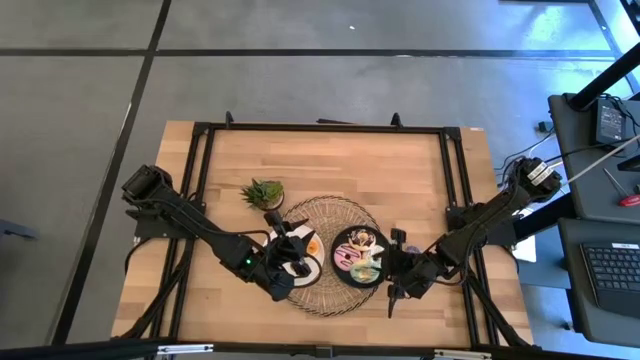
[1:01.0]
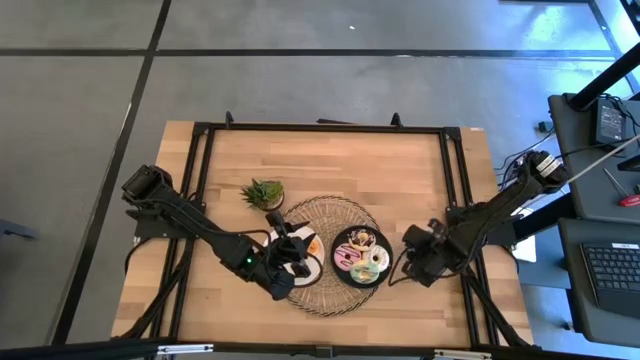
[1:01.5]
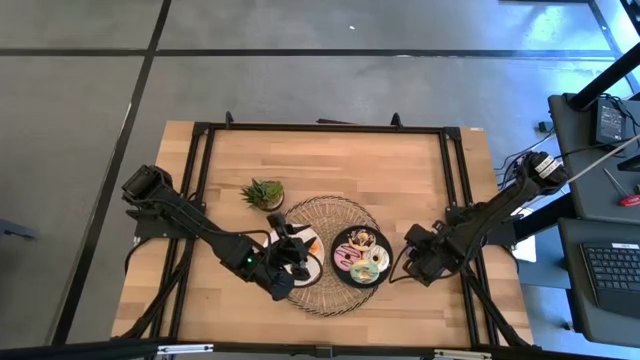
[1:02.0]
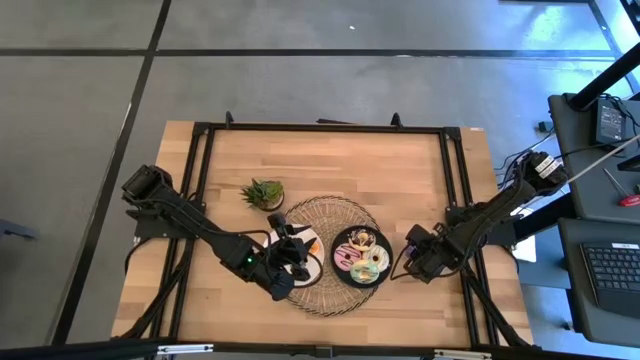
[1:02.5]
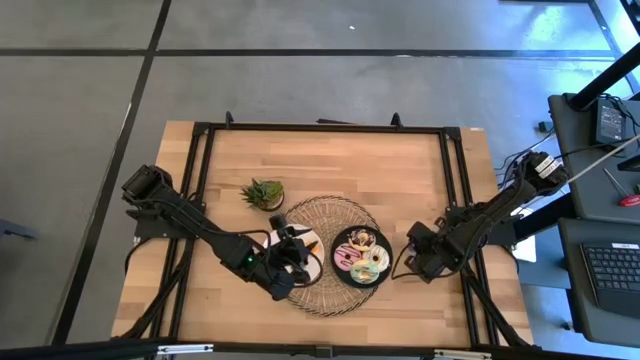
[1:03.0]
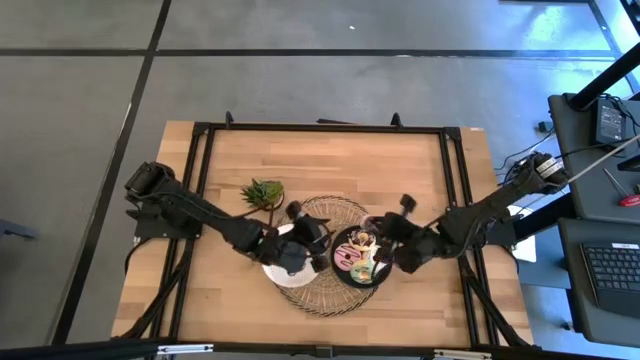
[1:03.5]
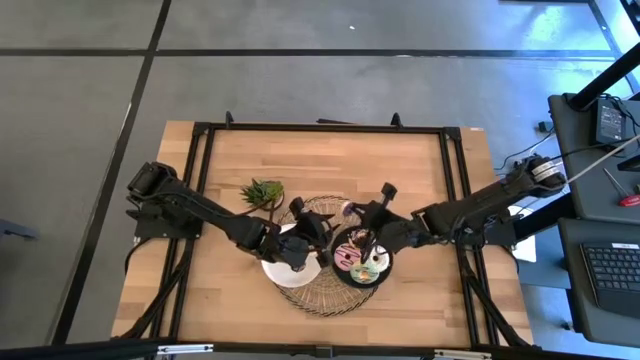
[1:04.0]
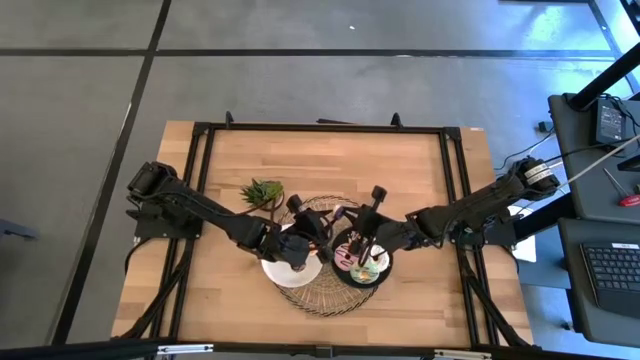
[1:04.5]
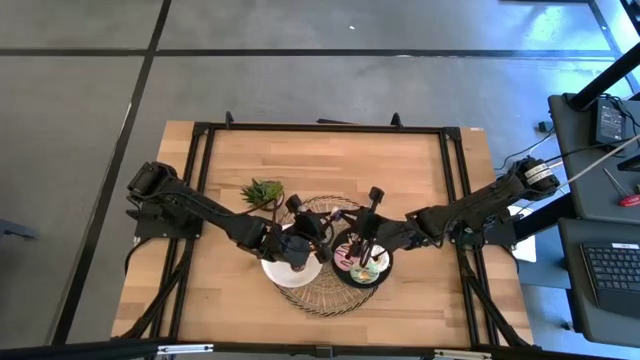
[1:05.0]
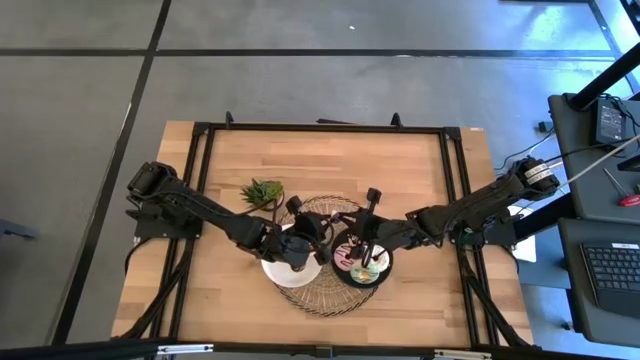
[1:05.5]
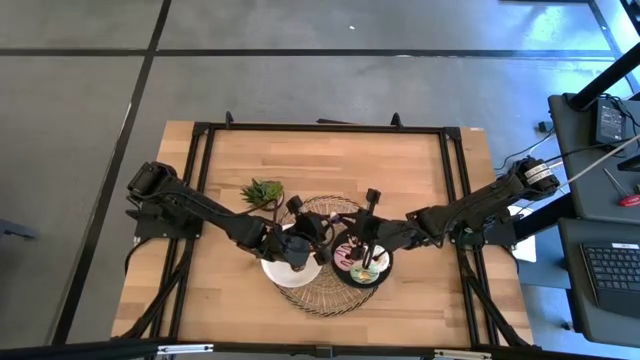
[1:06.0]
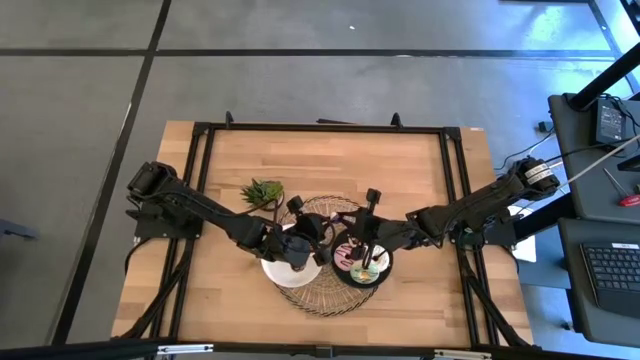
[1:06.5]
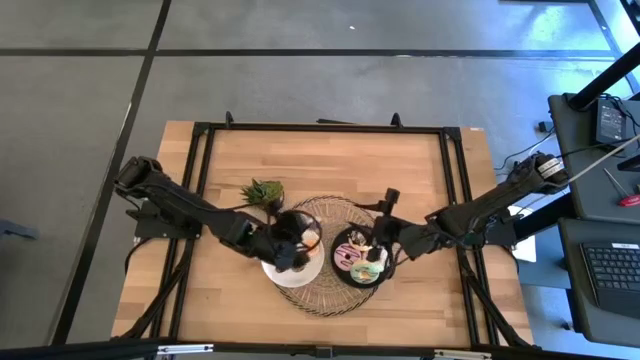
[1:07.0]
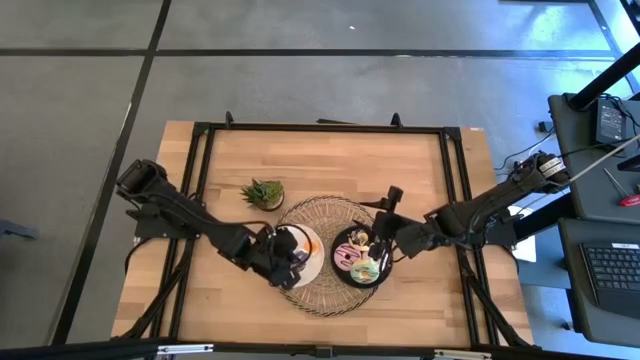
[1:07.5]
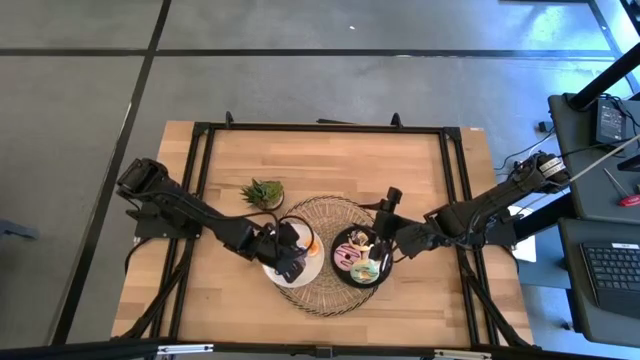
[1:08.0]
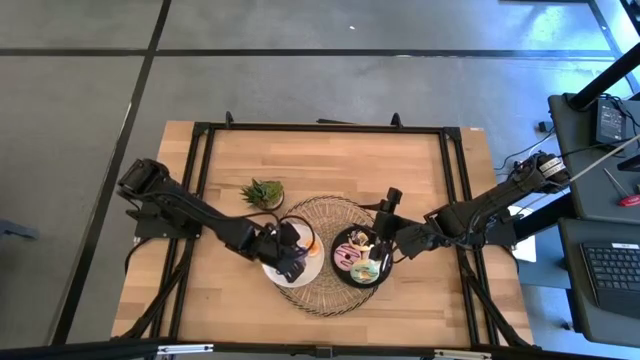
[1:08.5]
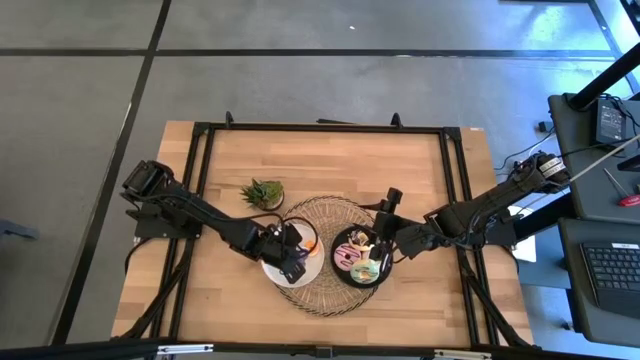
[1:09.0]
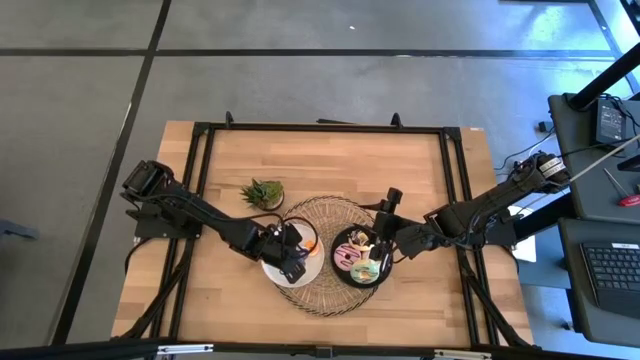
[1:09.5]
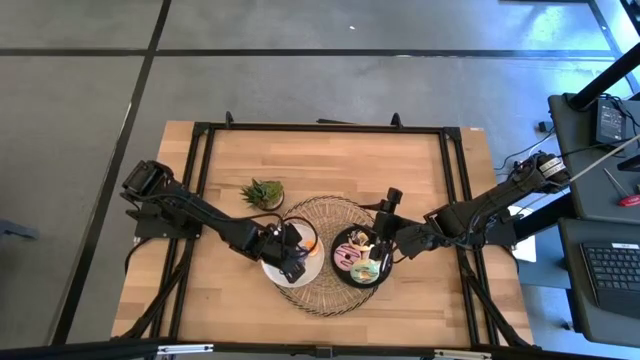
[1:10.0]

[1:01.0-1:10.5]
Task: Pick & Place donuts
Put the small violet donut on the white plate

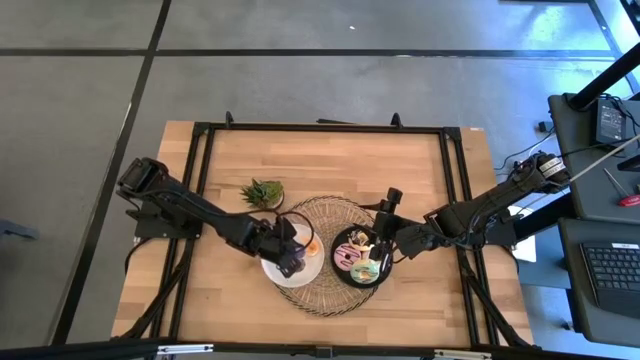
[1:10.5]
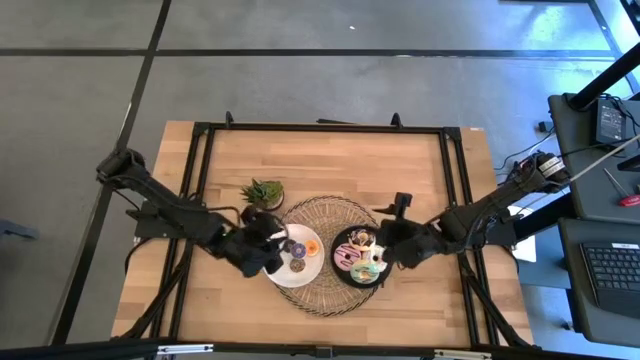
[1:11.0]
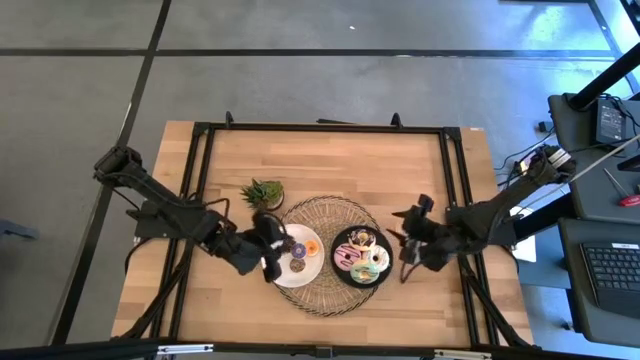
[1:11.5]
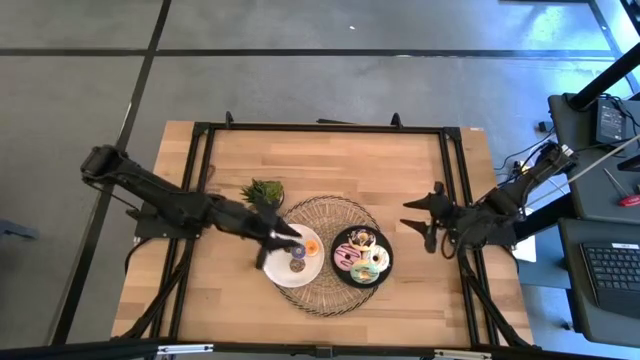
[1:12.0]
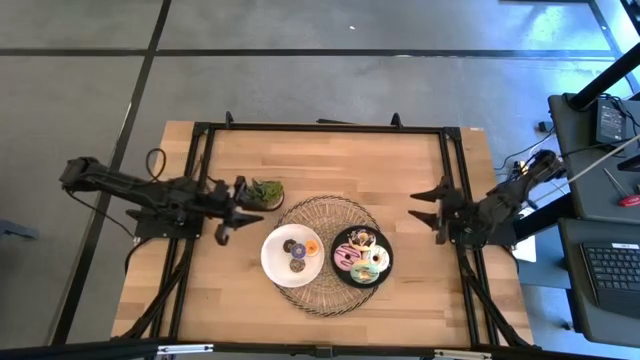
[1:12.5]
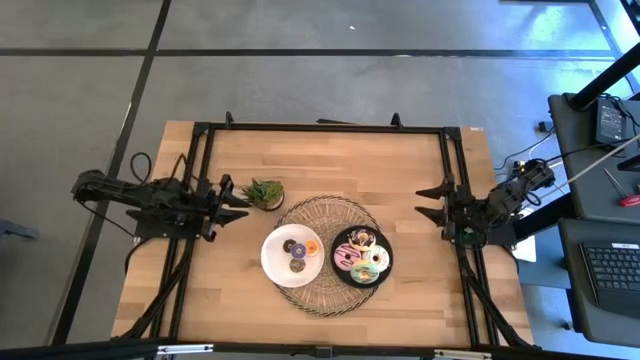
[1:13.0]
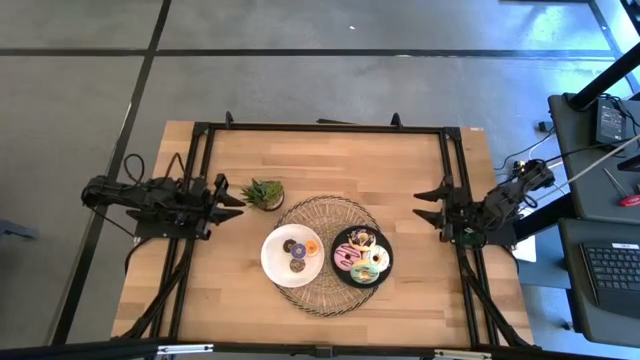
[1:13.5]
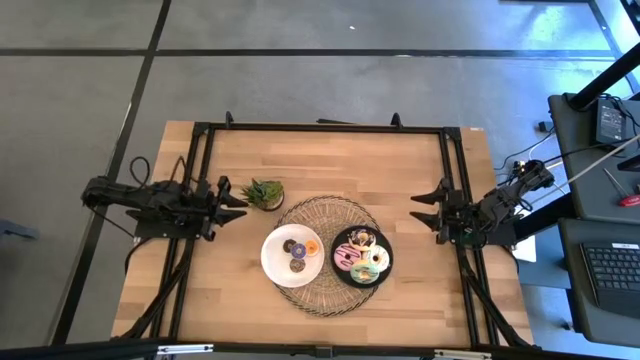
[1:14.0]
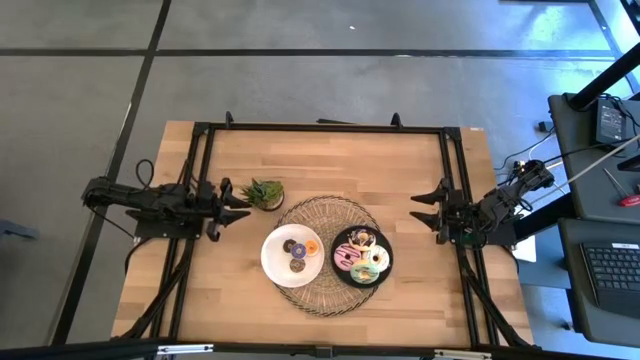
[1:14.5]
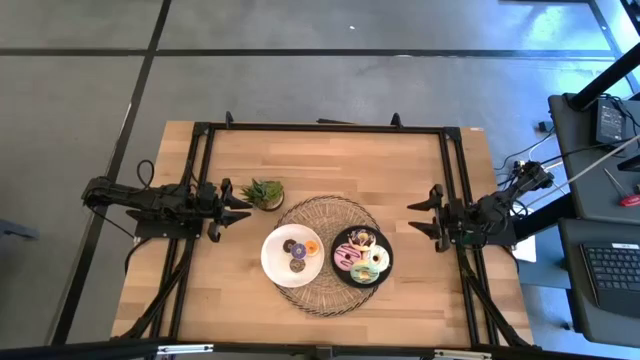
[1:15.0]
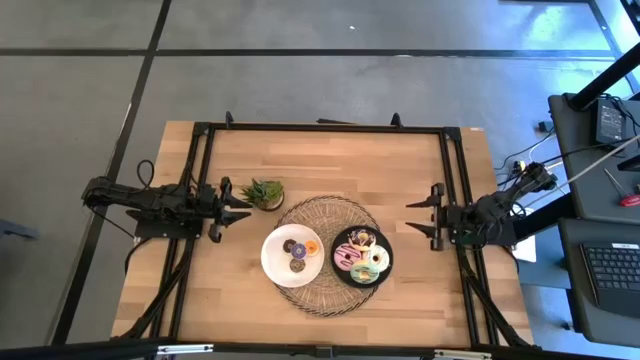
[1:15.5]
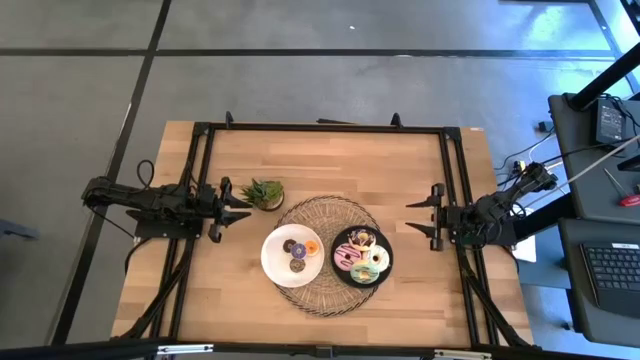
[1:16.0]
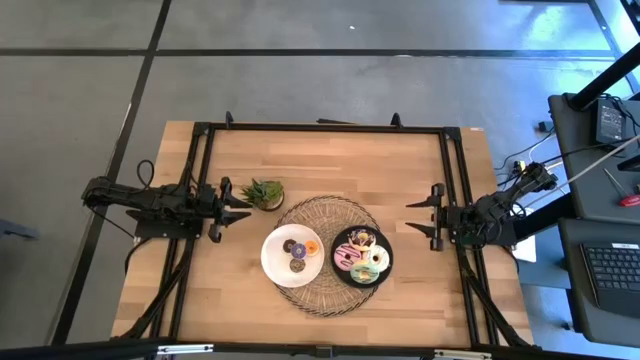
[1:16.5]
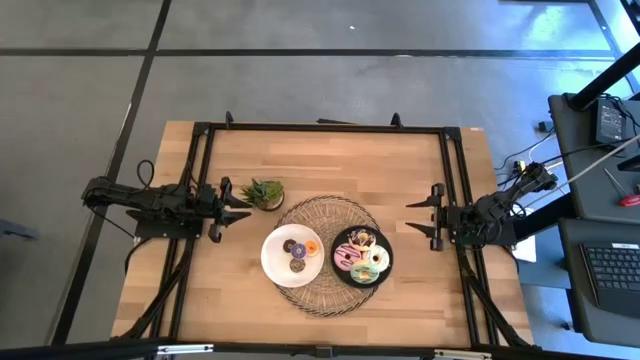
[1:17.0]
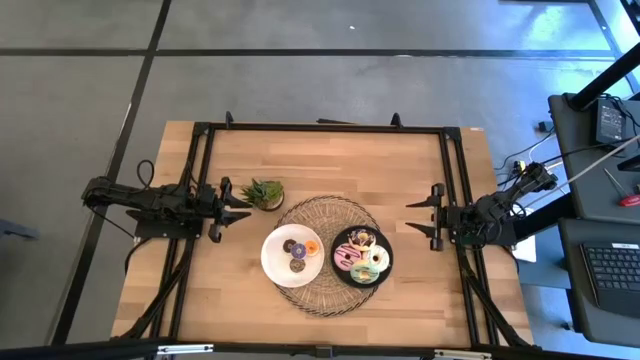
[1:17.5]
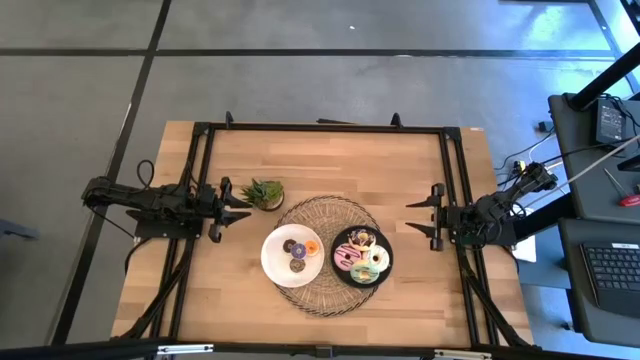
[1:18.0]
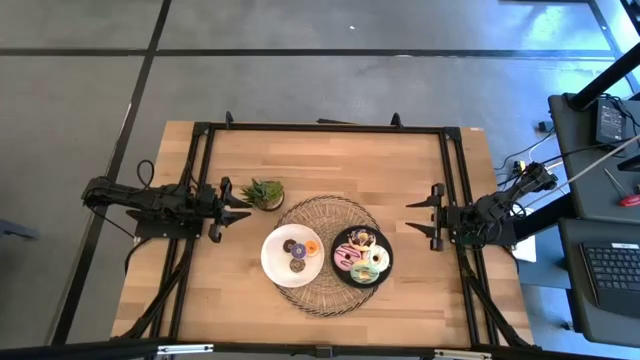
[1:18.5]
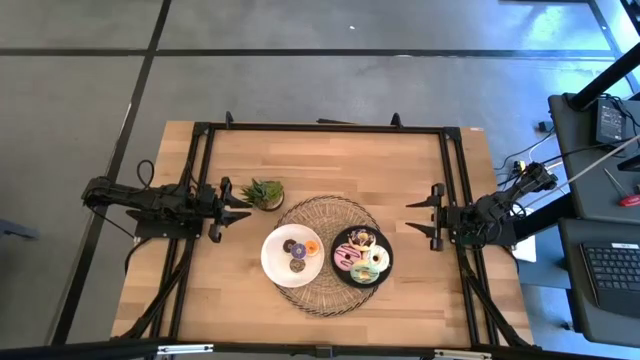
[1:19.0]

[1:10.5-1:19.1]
Return to Home Position

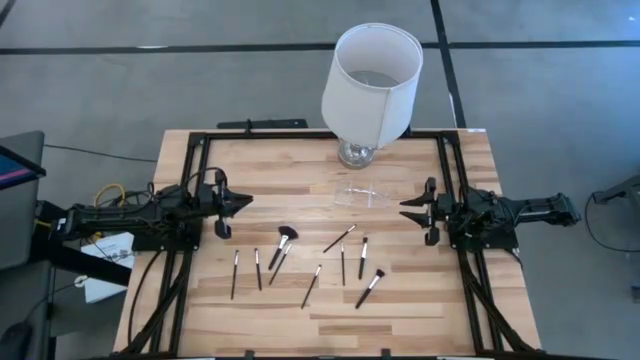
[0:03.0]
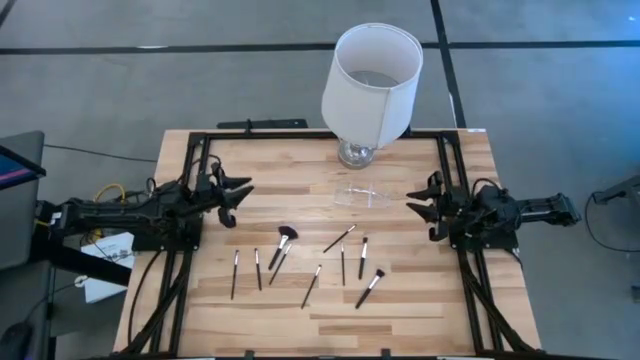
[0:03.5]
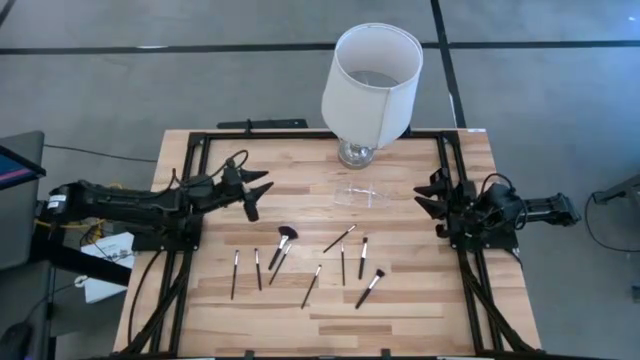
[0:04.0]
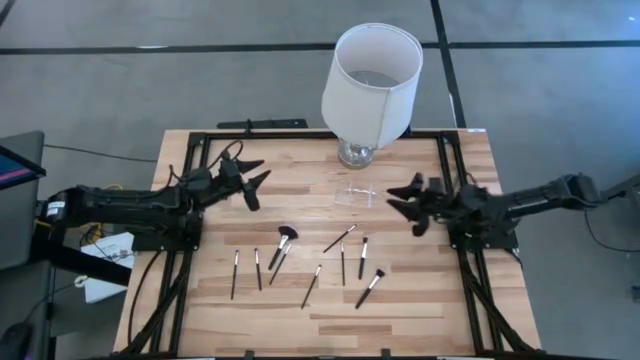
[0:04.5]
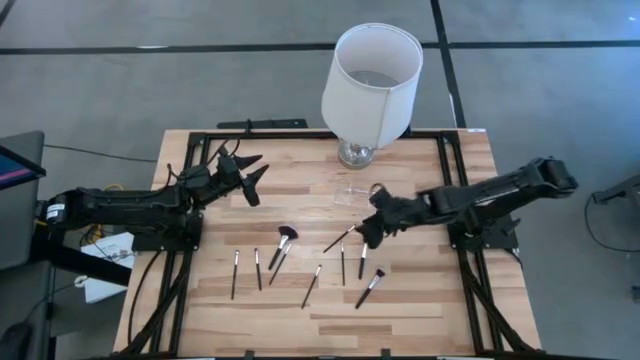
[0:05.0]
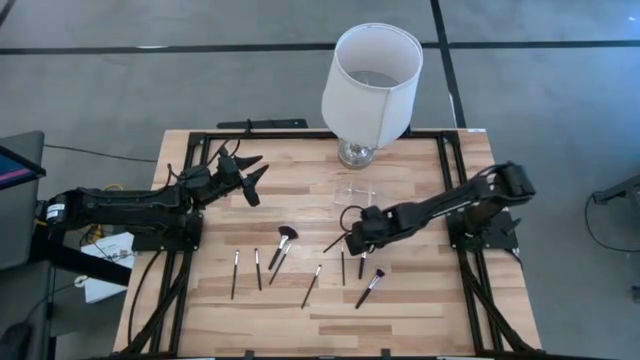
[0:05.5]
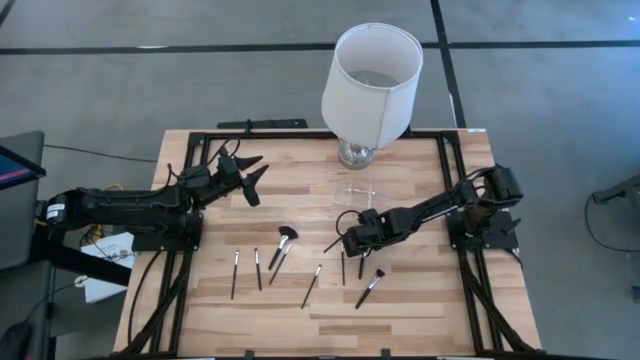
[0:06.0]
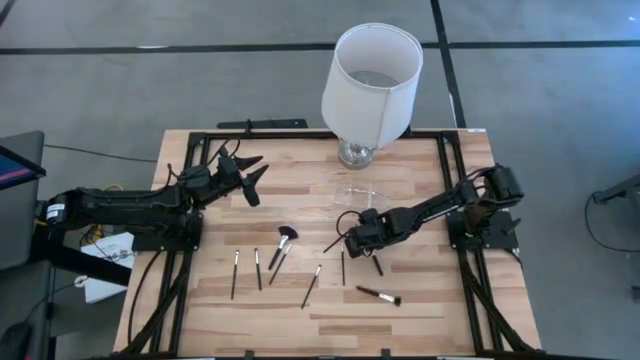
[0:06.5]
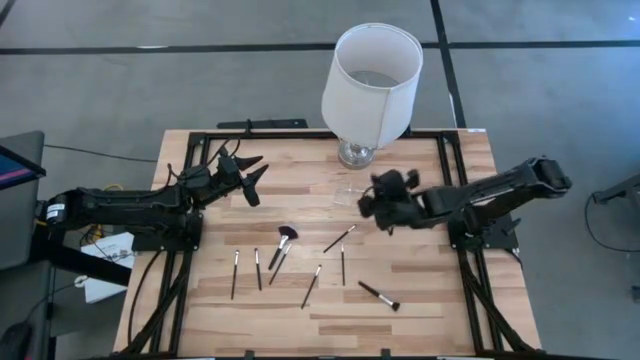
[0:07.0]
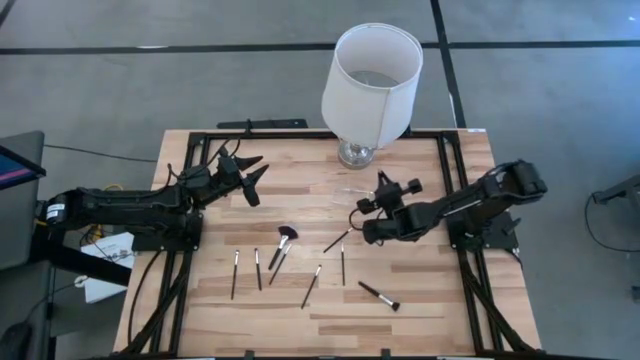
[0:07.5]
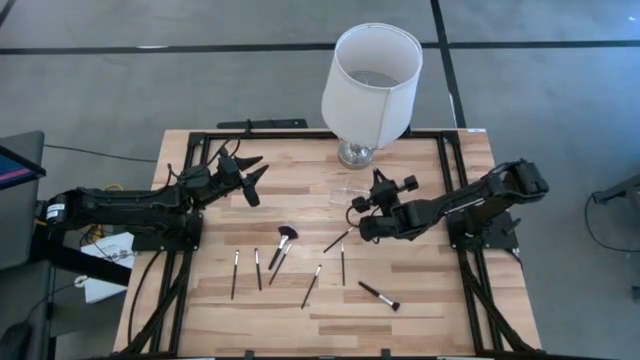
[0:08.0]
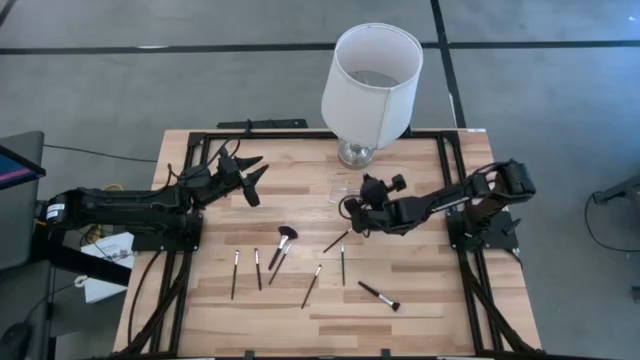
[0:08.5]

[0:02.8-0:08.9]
Task: Put items in baskets/containers
Put the foundation brush into the transparent organizer
